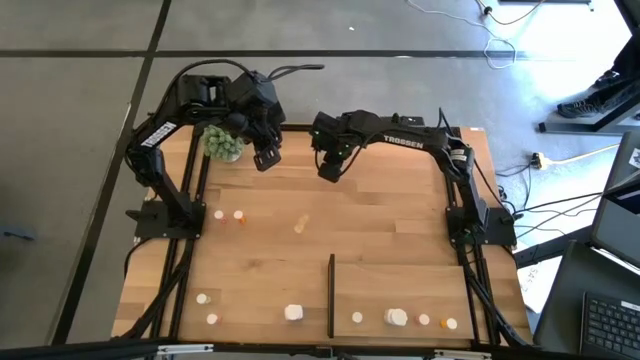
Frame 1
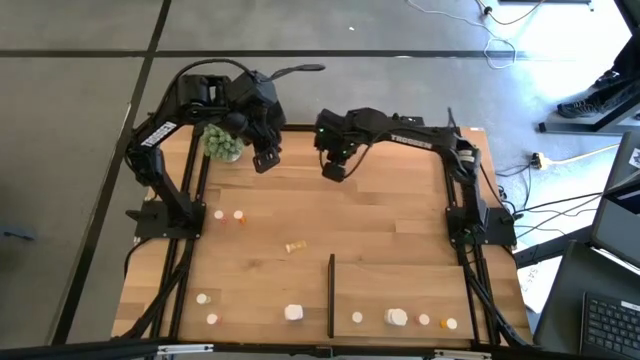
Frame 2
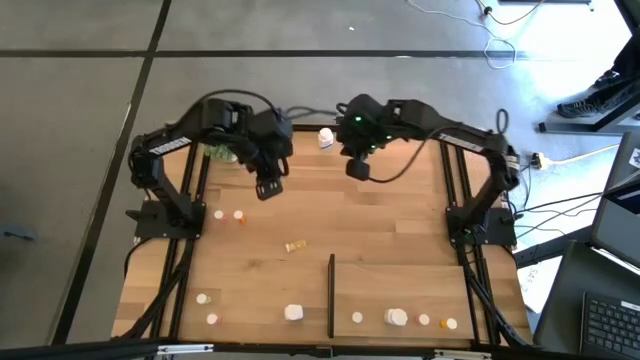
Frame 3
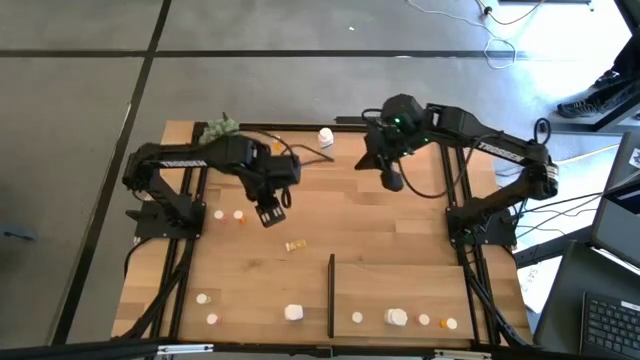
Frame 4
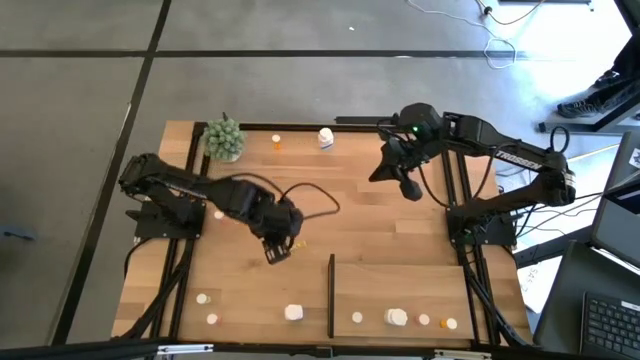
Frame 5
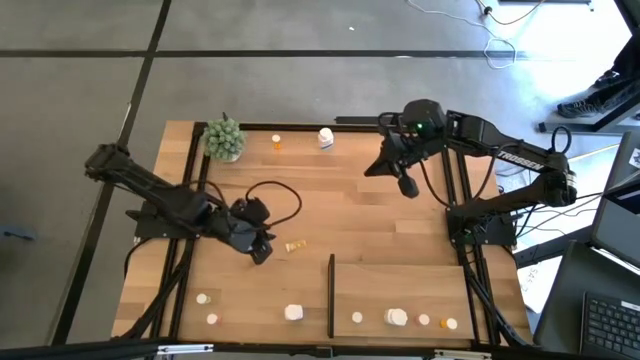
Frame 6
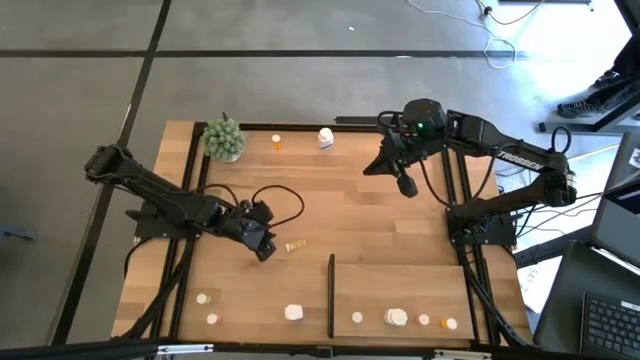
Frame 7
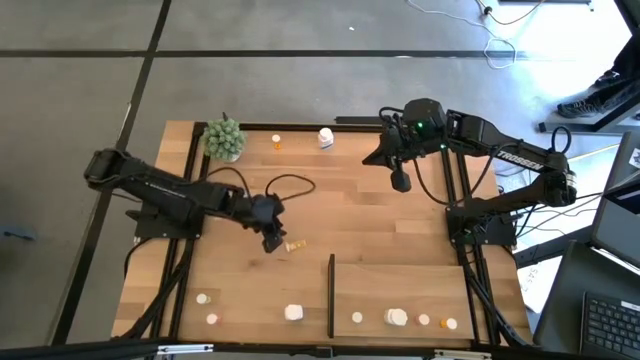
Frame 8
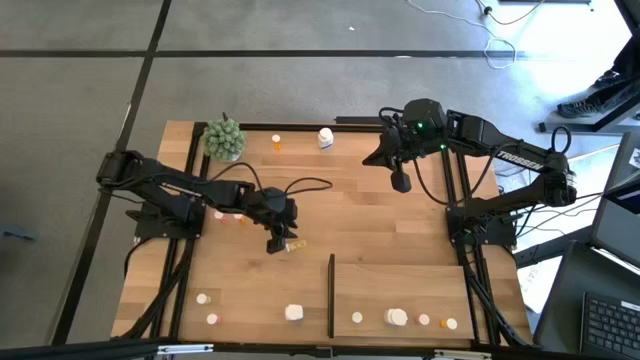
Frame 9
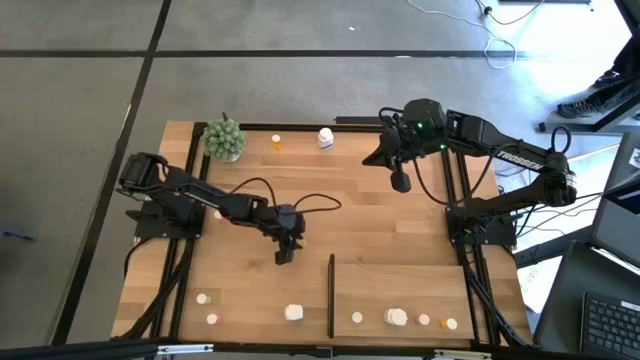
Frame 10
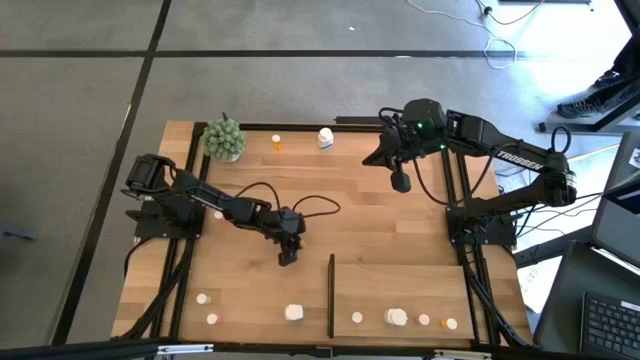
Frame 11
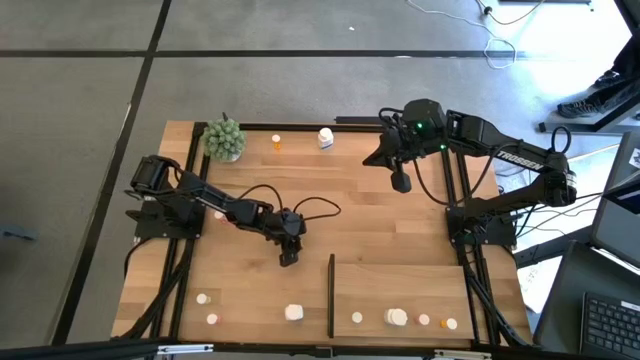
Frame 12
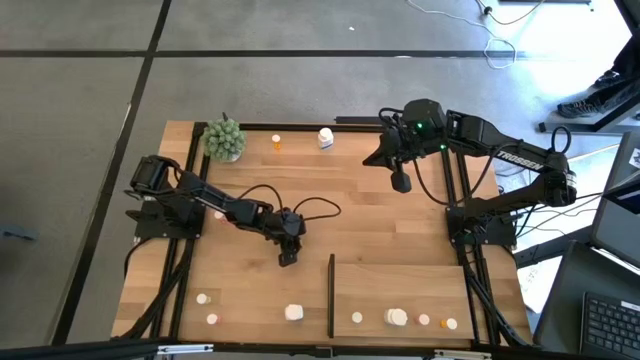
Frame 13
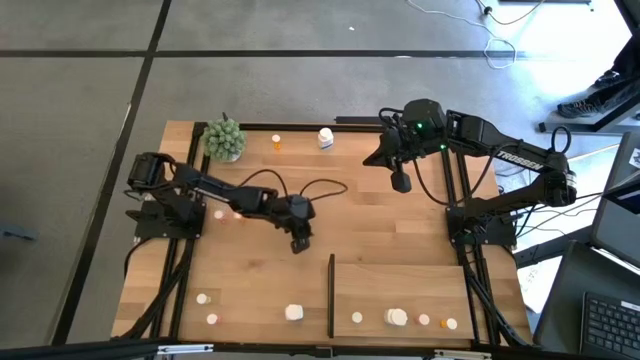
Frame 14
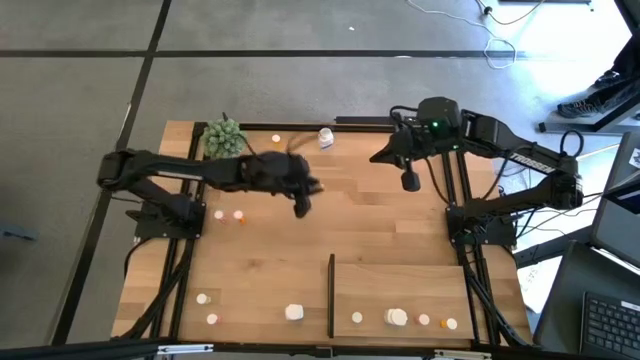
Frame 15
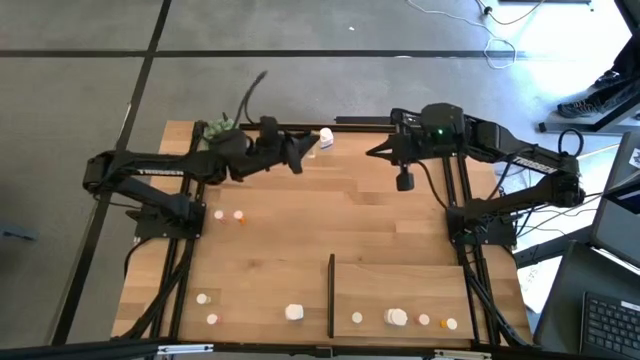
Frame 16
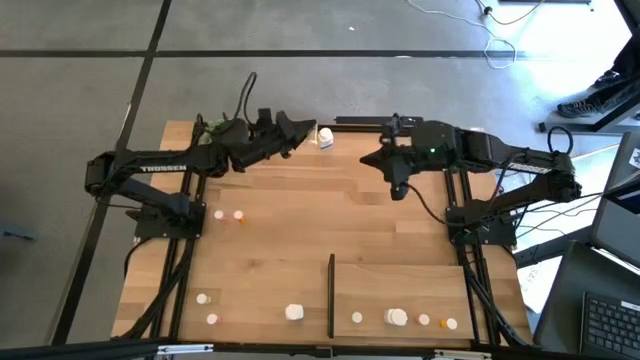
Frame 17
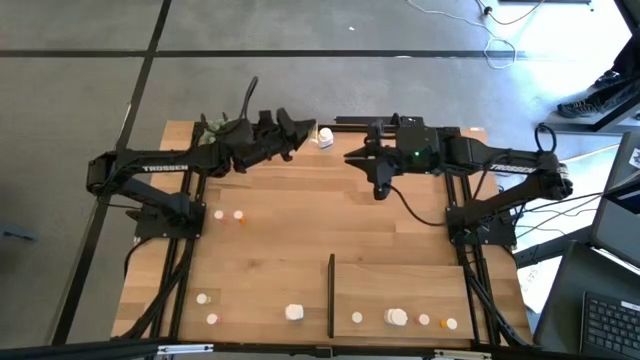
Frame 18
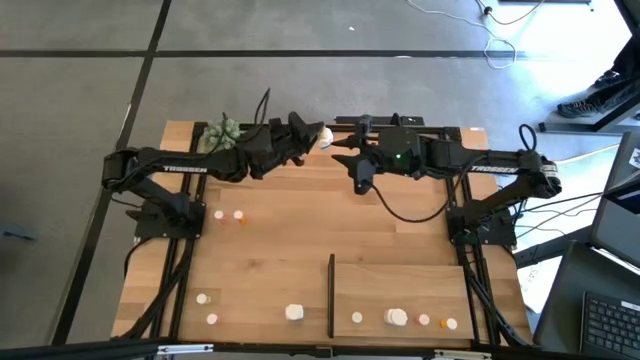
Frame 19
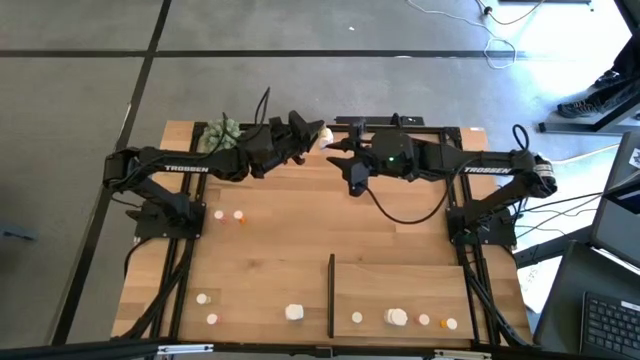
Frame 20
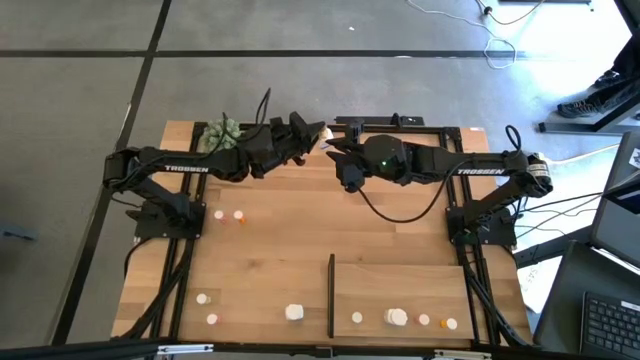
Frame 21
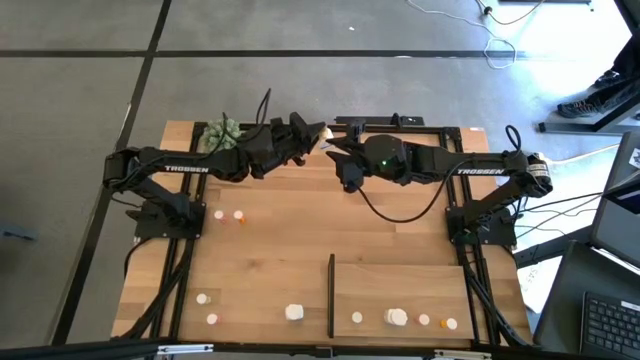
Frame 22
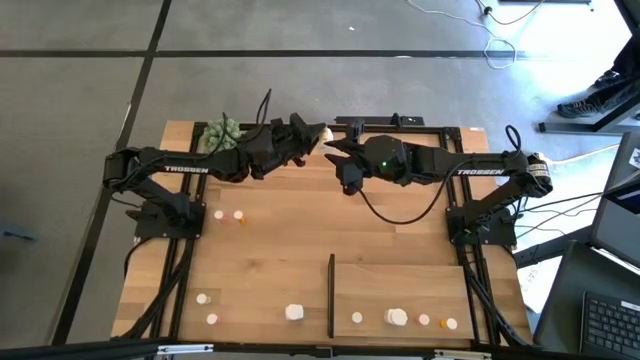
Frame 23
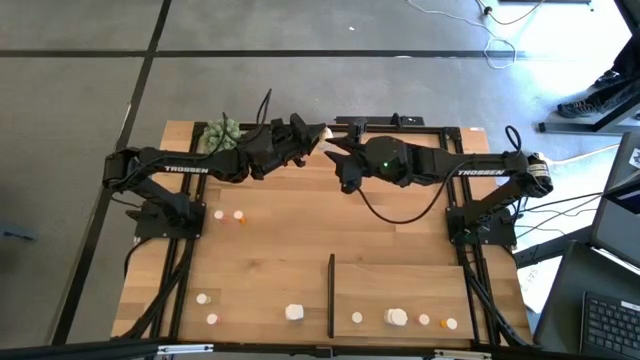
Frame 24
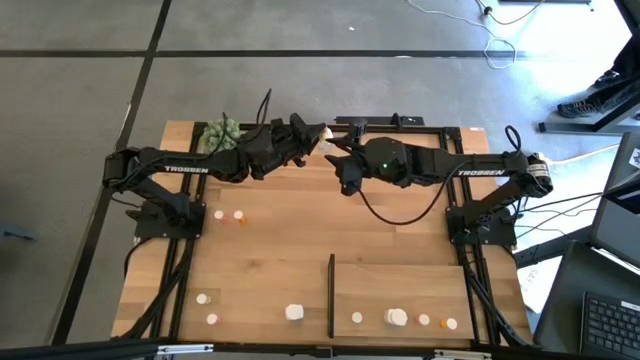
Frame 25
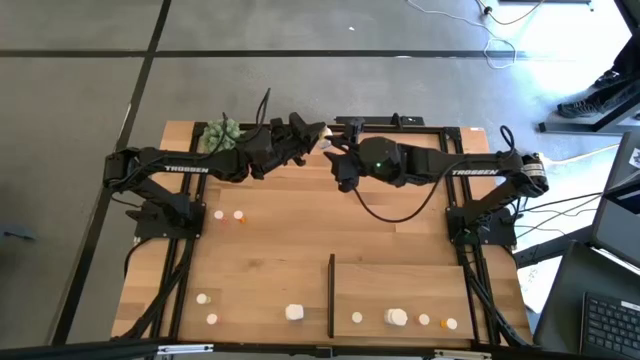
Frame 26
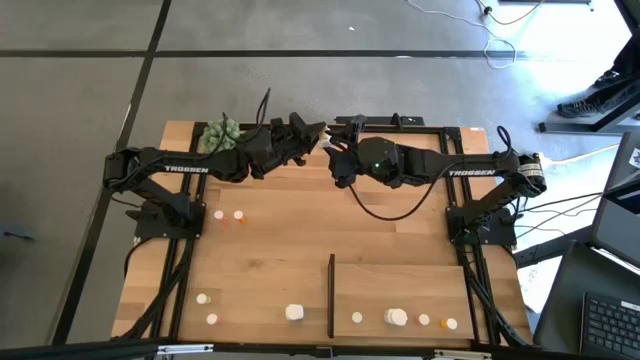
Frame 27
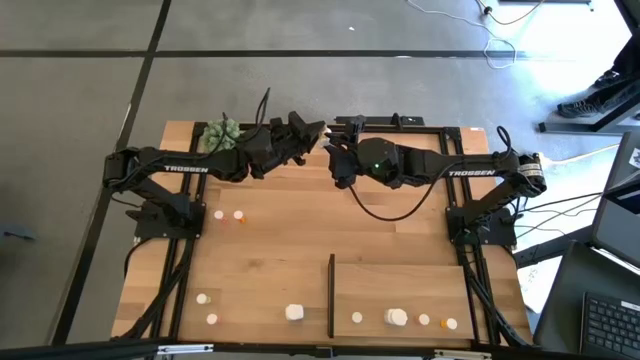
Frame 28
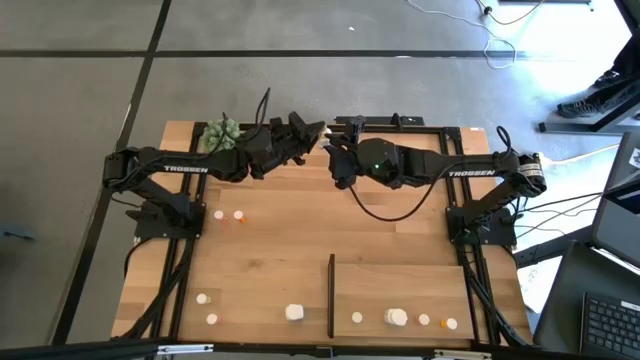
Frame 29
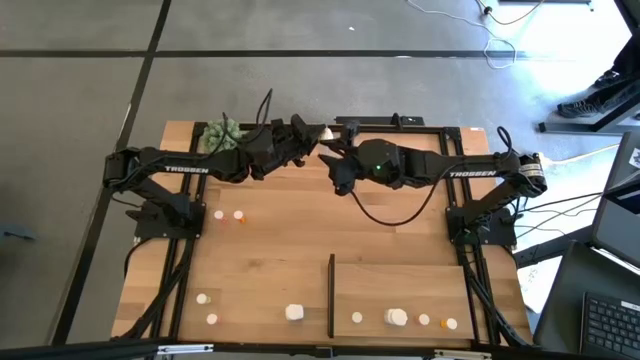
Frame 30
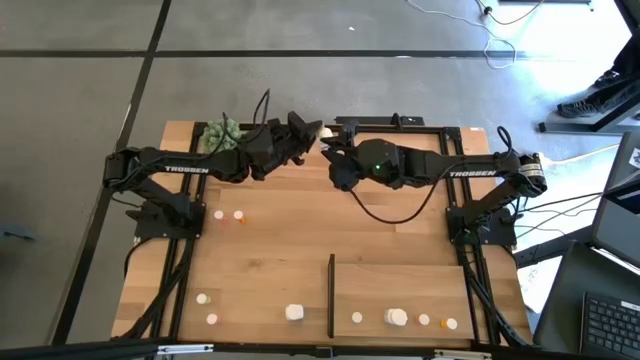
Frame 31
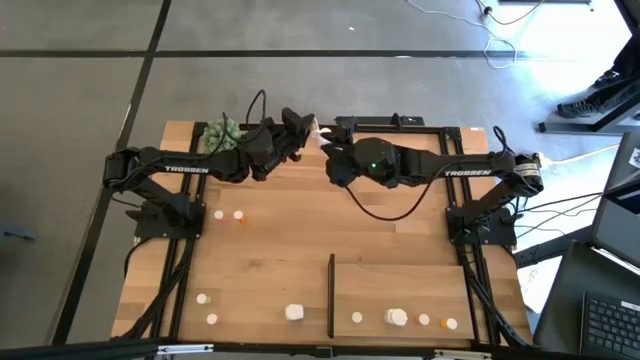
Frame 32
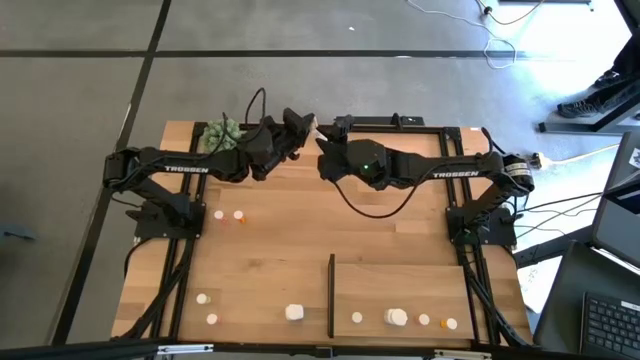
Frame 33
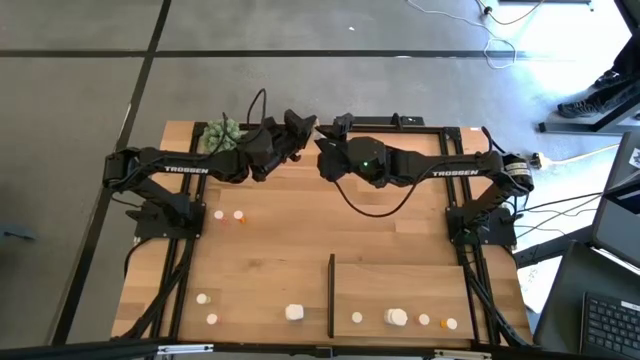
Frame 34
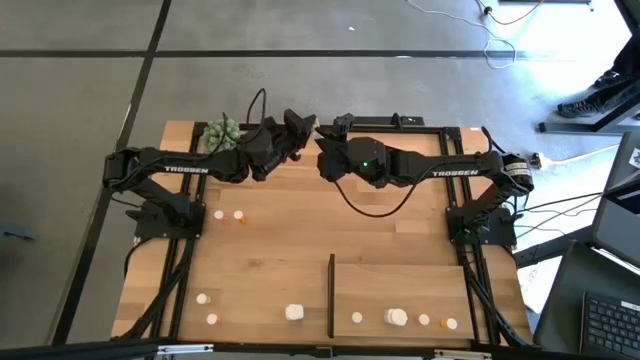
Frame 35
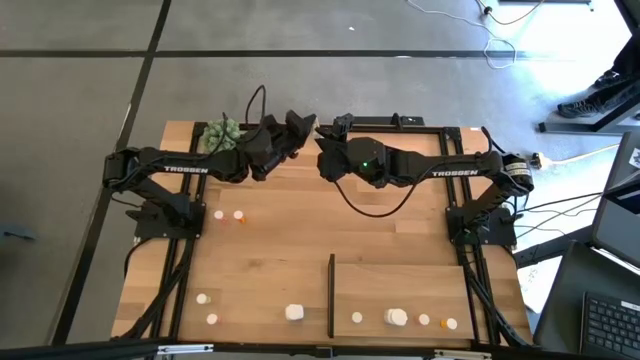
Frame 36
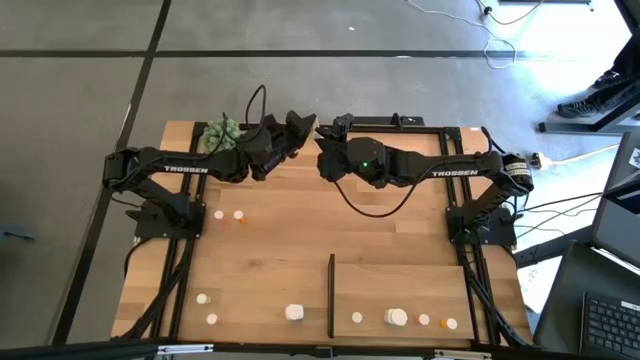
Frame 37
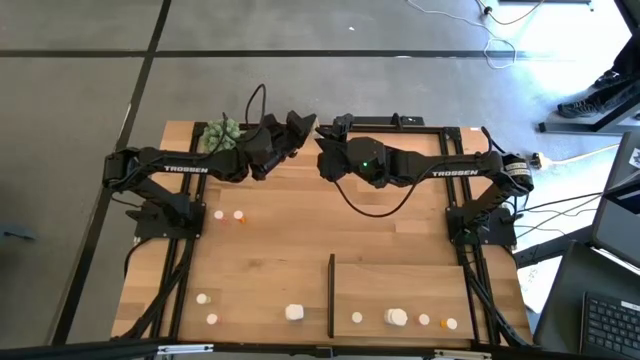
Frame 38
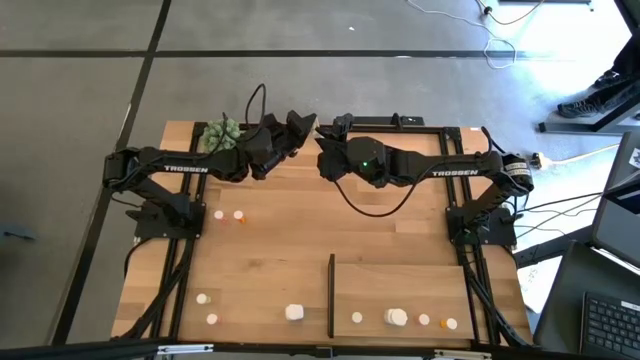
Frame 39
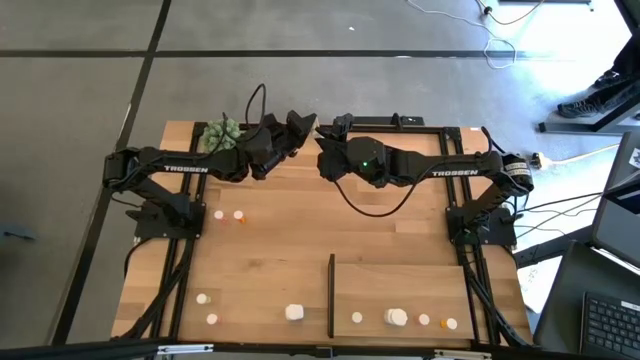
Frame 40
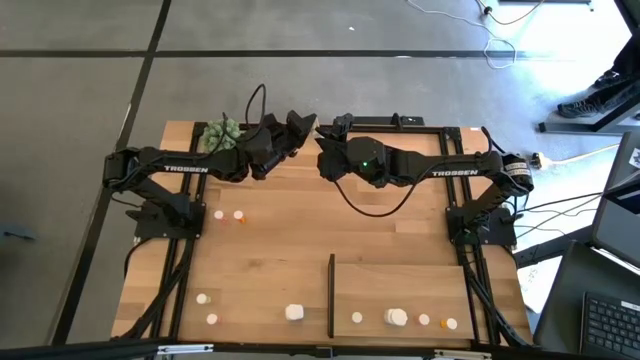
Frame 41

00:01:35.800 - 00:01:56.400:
Task: Pick and place medicine bottles onto shelf by color
Put the top yellow pill bottle on the shelf aligned with the other yellow pill bottle

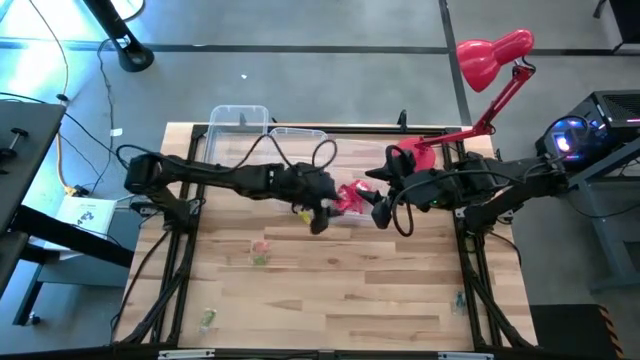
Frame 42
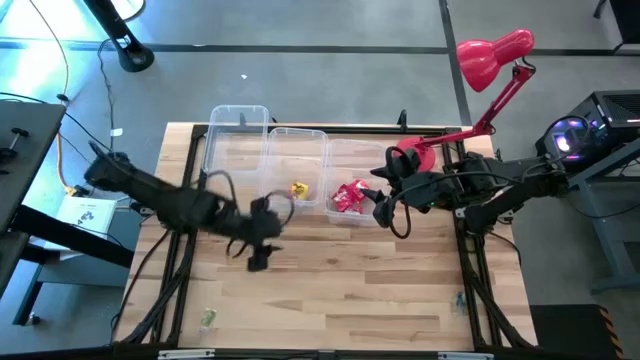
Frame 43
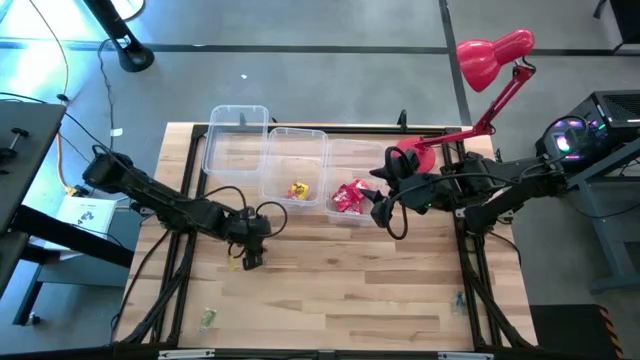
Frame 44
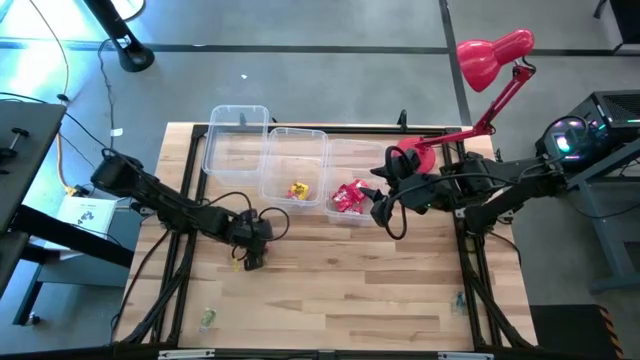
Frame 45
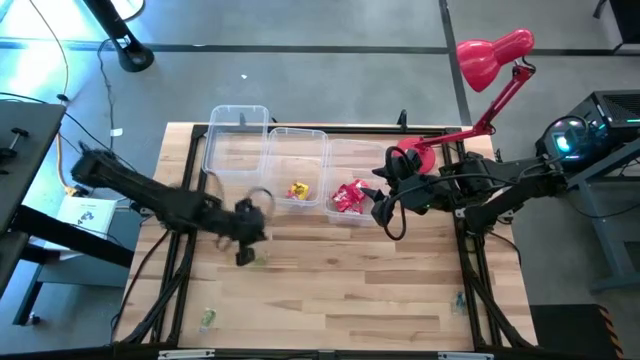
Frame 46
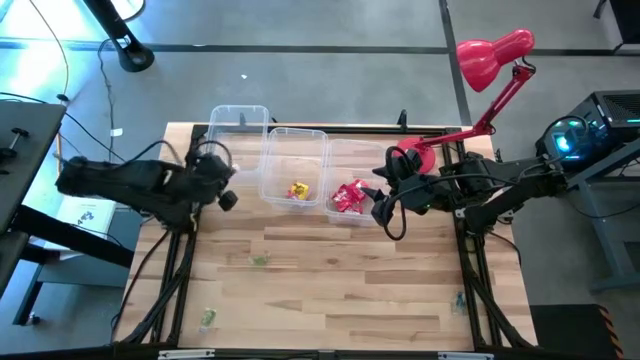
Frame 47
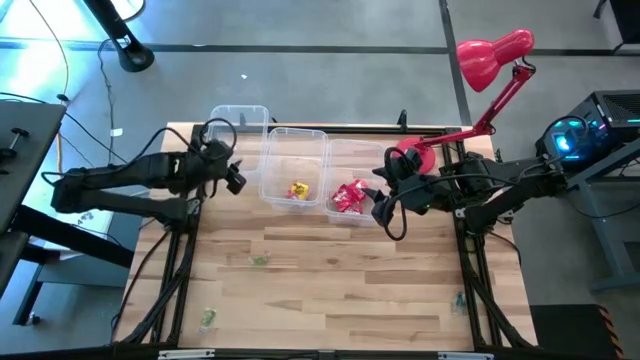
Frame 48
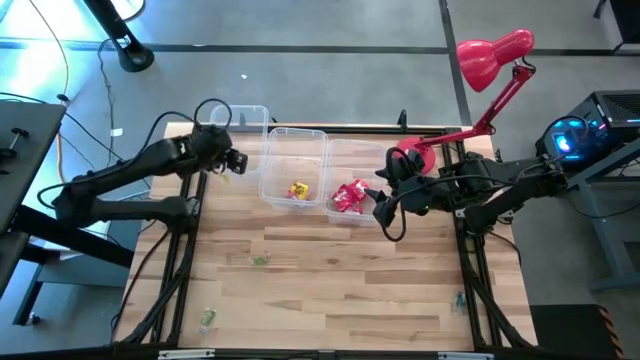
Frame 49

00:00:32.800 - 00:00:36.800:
Task: Sort candy
Put the orange gummy into top left transparent bin
